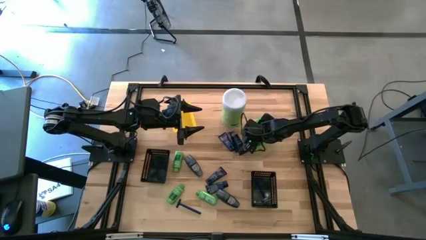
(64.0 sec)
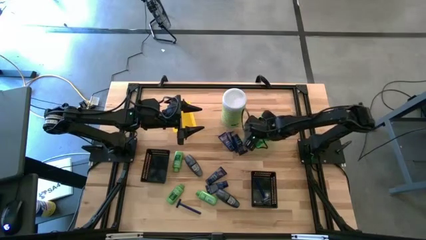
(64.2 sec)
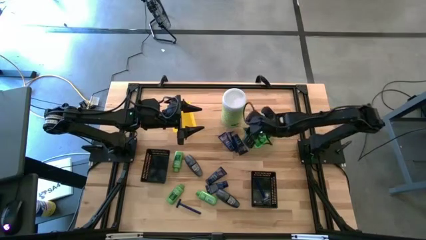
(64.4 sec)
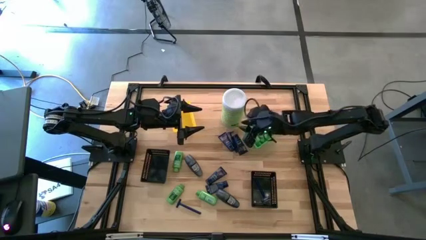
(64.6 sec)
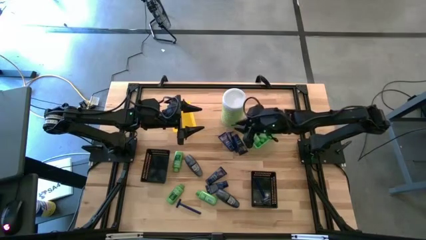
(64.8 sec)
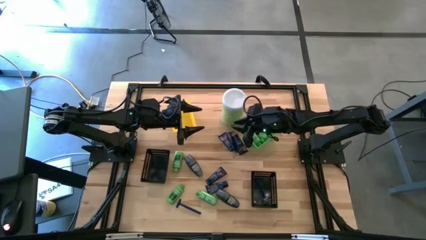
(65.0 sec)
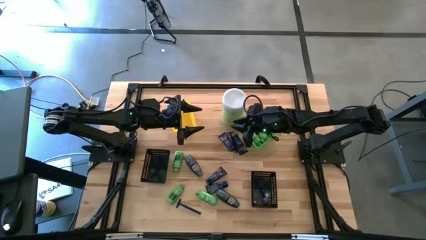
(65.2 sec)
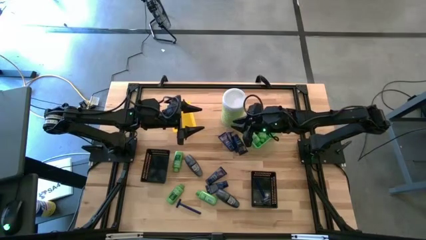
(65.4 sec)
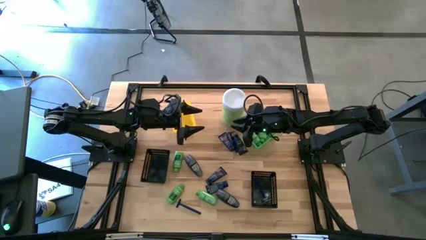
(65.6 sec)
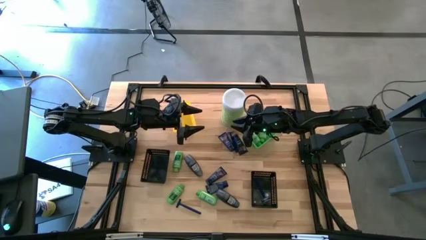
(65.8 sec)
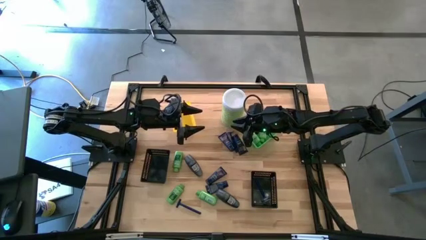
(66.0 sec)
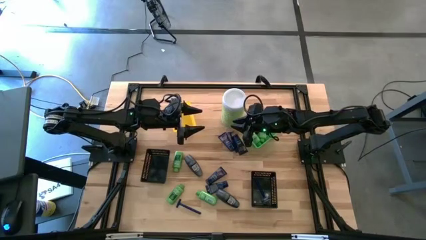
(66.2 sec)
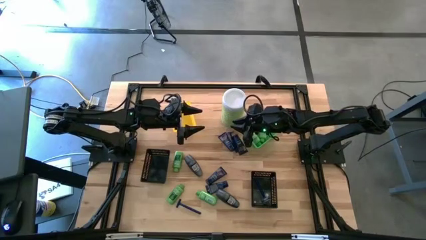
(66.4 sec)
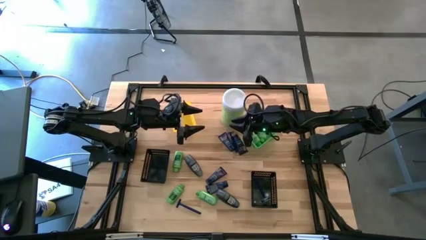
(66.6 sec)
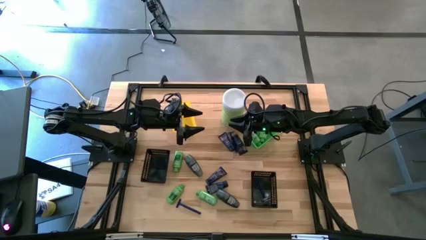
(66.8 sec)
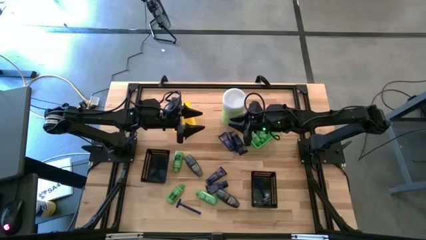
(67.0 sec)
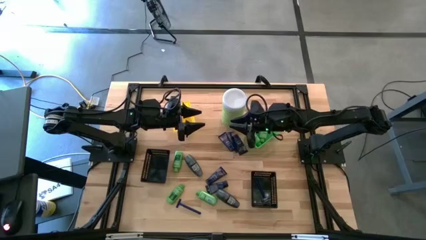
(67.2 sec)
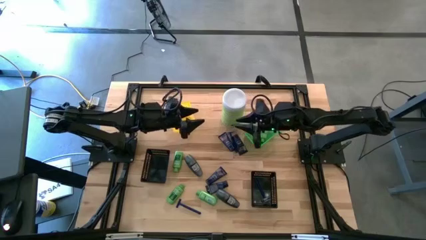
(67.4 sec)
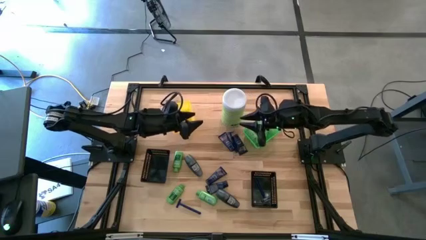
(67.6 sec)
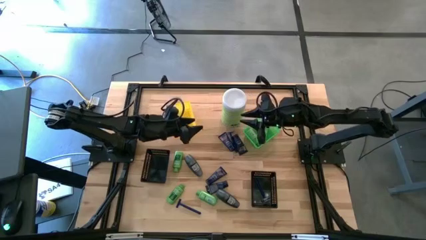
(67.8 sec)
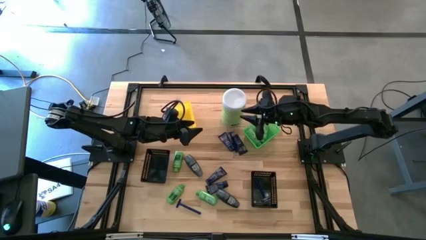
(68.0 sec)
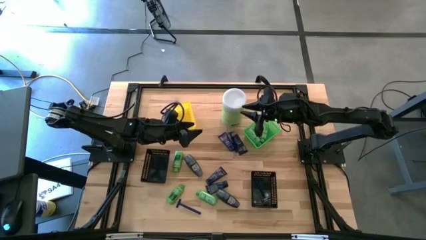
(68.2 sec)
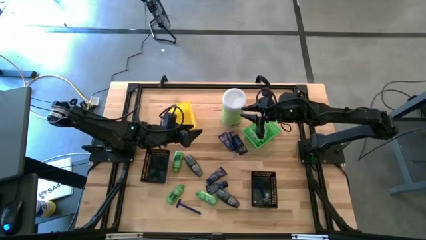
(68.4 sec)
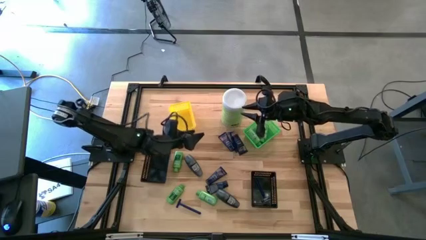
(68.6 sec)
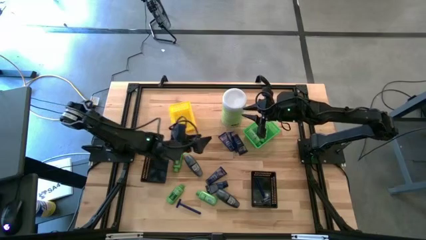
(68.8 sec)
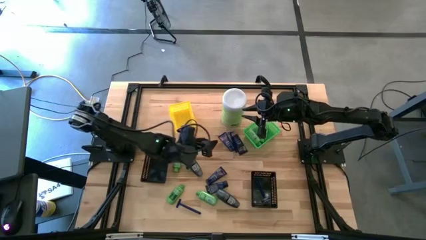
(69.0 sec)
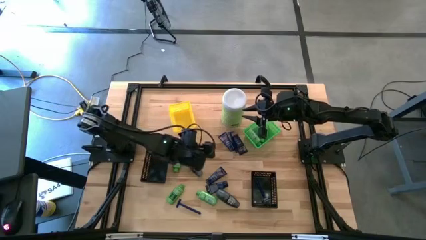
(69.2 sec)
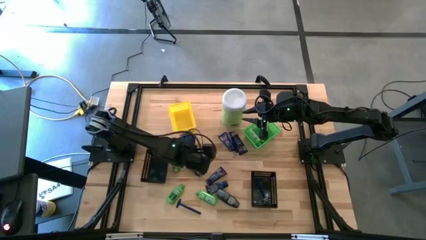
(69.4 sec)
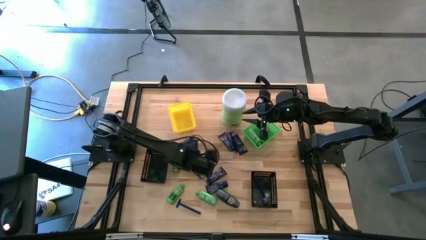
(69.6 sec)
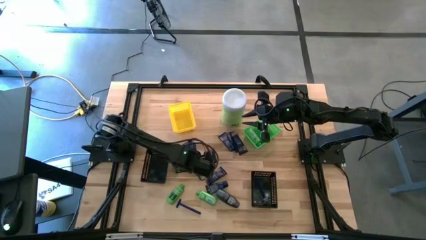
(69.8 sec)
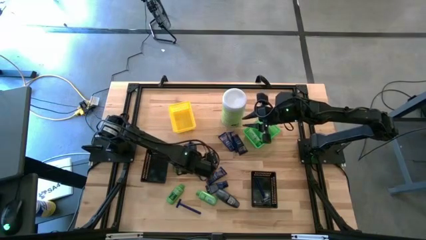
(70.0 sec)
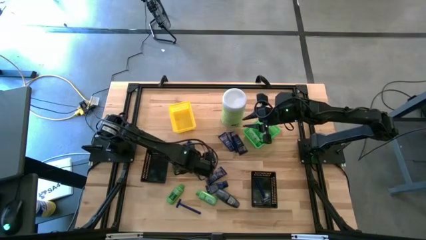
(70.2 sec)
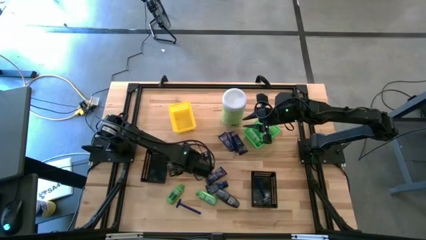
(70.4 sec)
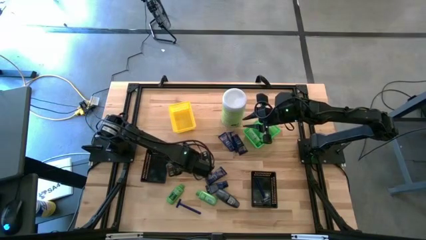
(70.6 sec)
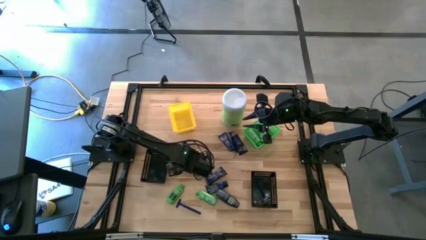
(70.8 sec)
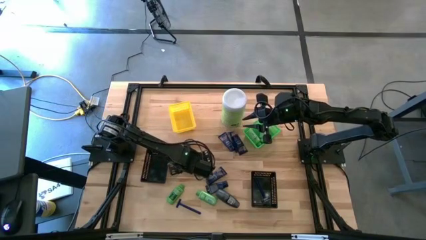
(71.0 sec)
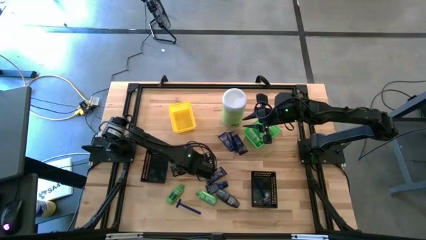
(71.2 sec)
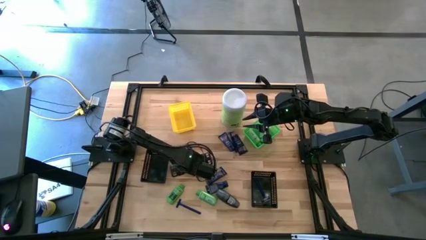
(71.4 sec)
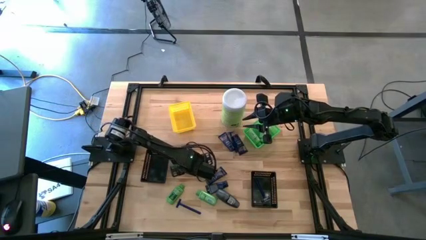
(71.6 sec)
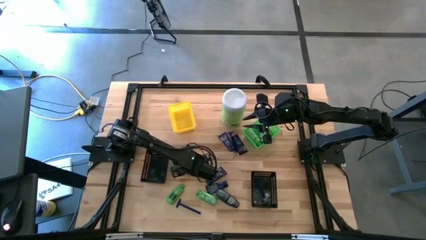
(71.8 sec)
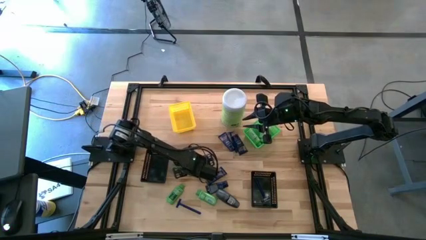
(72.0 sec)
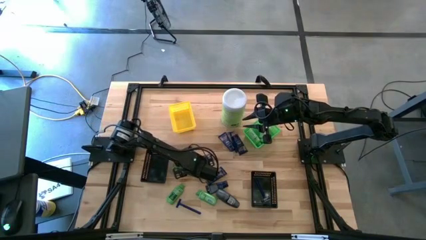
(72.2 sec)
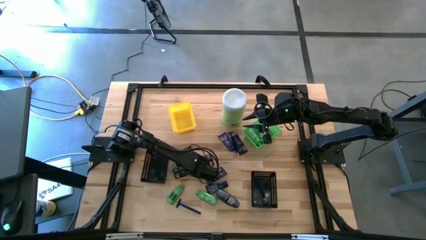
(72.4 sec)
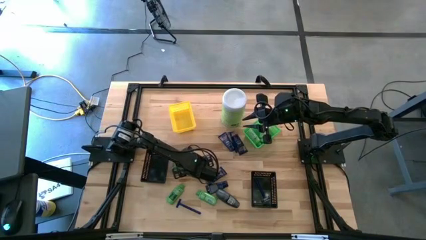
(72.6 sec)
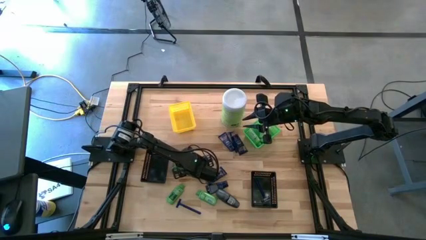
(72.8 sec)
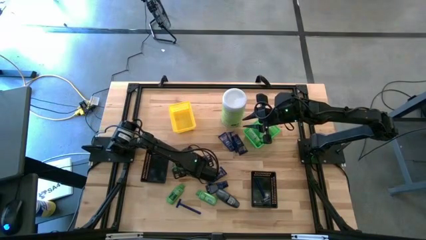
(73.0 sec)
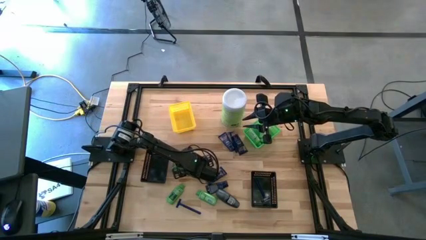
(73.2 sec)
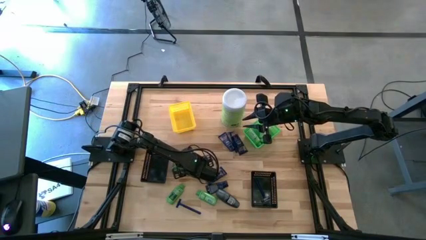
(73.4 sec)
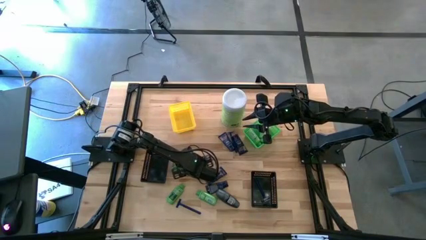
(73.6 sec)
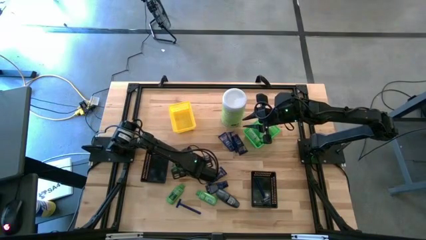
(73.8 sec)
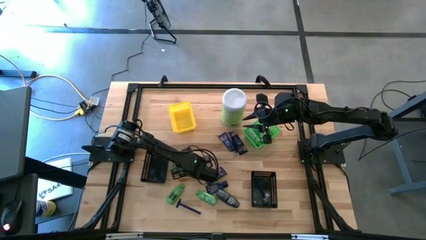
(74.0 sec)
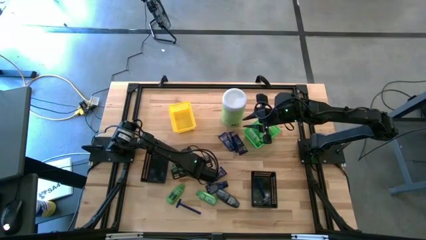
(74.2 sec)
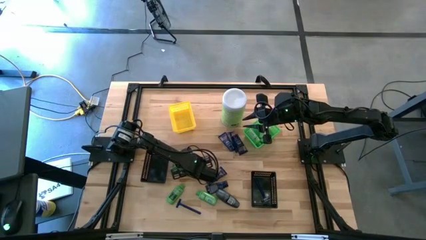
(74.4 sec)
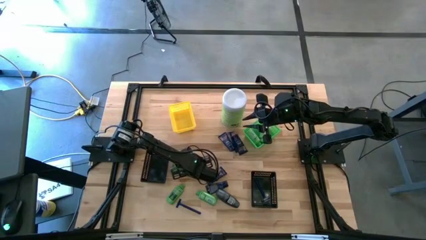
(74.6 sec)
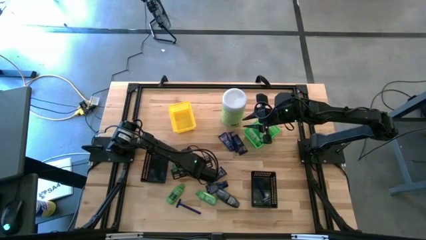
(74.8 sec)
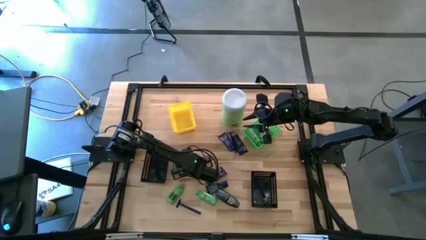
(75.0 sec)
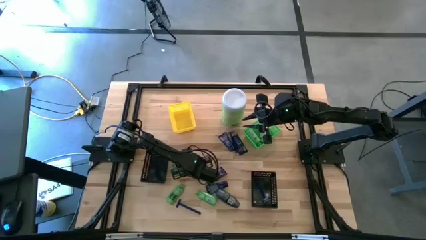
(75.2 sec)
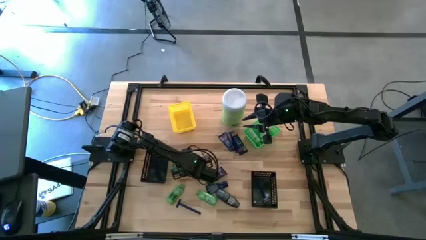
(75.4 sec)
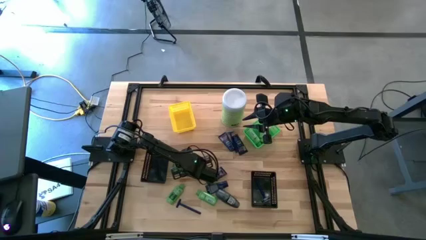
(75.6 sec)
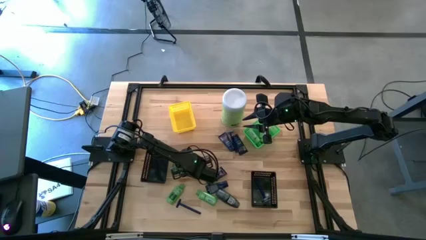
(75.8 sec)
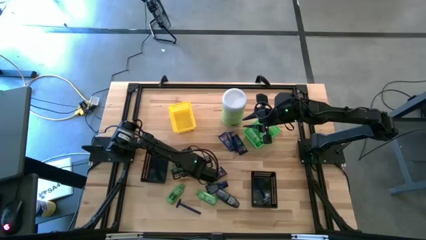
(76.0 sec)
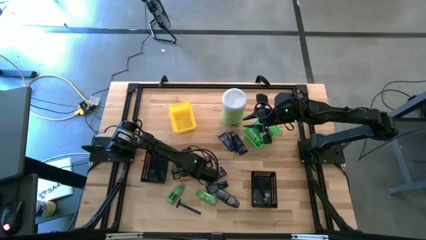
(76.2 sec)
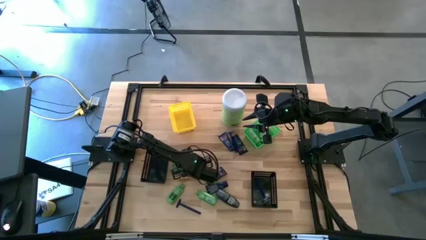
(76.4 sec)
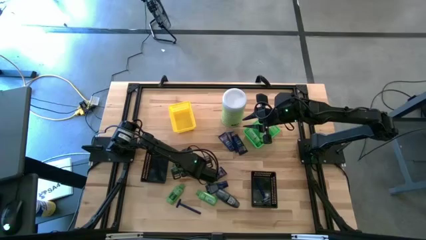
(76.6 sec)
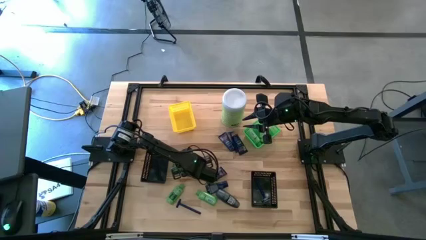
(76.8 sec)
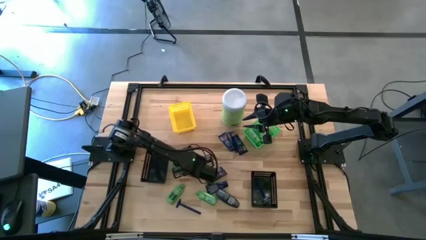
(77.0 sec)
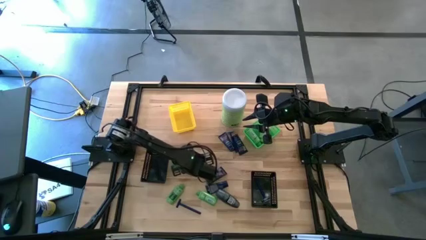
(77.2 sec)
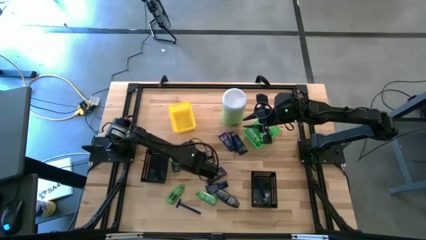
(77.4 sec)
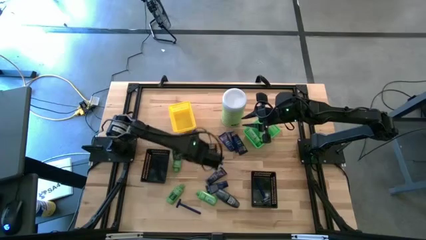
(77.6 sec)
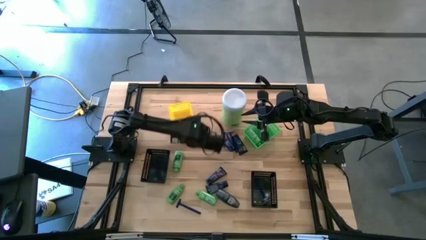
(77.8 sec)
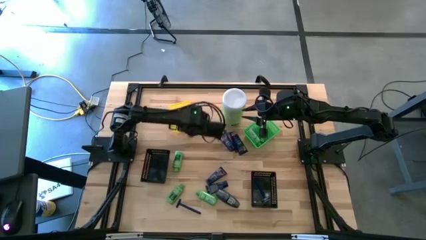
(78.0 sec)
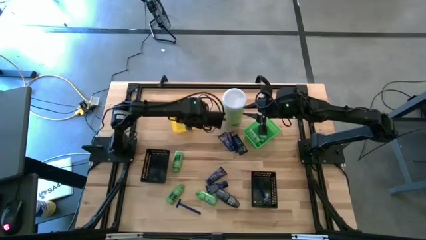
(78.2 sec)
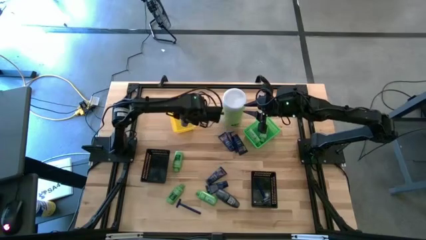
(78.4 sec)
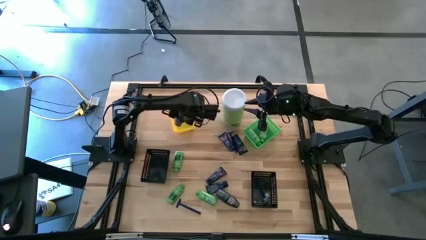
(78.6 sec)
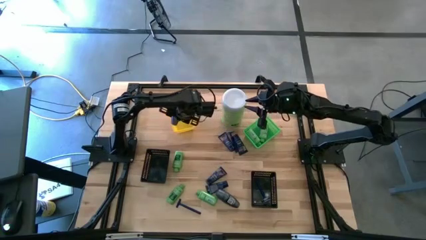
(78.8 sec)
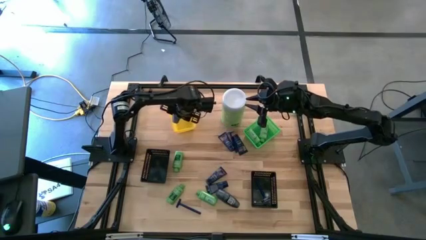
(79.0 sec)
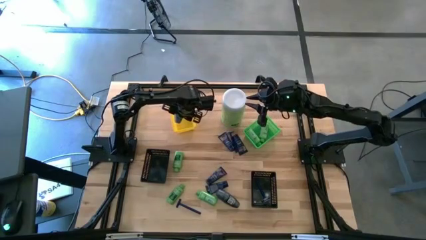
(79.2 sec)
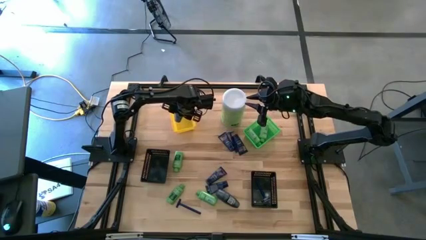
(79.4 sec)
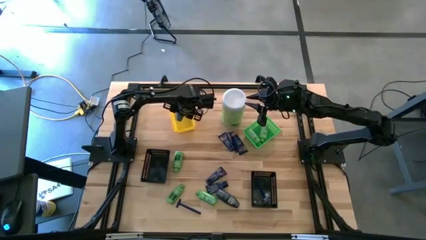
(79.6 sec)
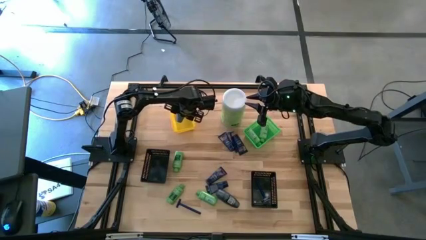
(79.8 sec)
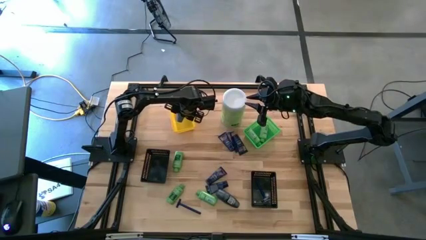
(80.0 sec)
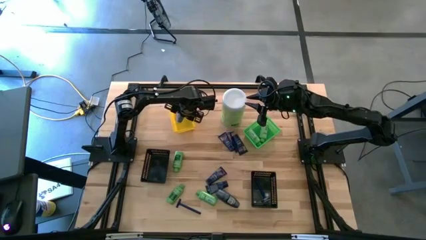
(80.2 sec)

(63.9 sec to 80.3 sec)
Task: Pick & Place Travel size toiletries
Put the top deodorant into the yellow bin
